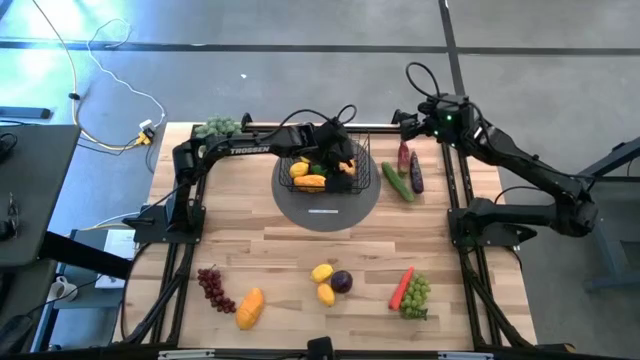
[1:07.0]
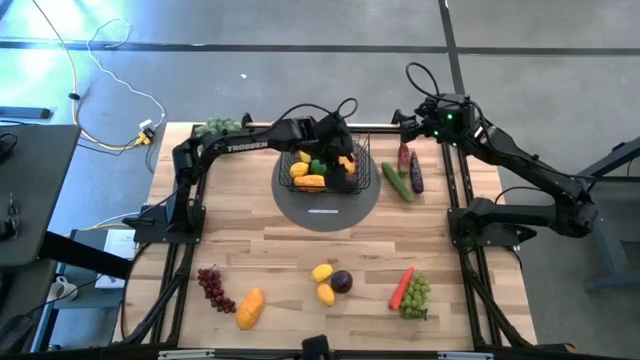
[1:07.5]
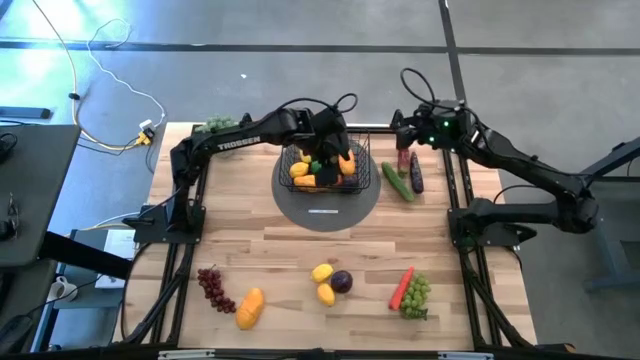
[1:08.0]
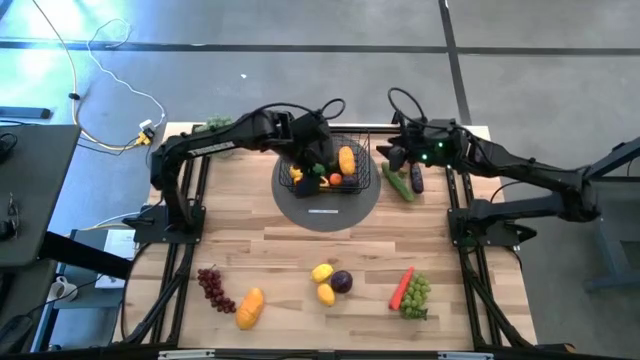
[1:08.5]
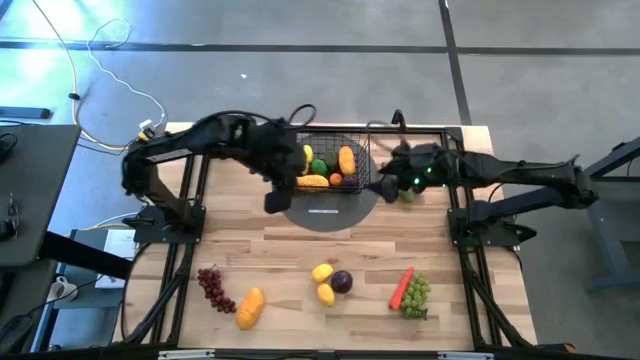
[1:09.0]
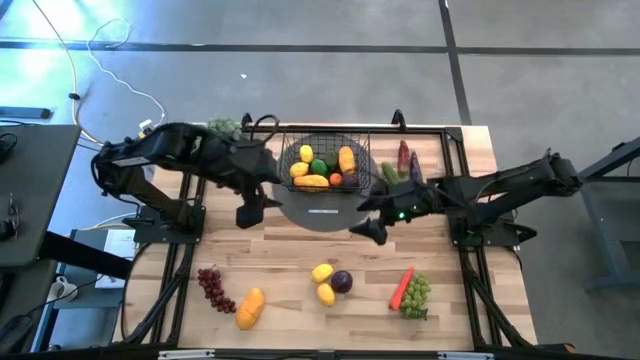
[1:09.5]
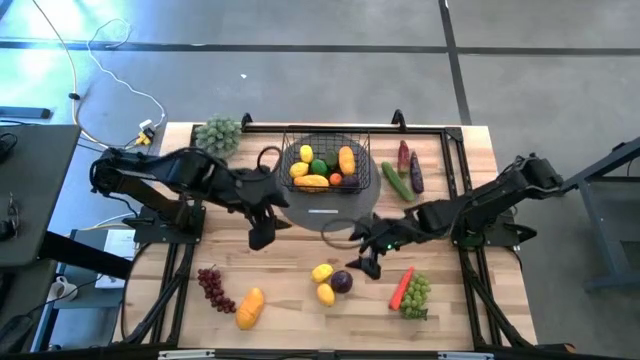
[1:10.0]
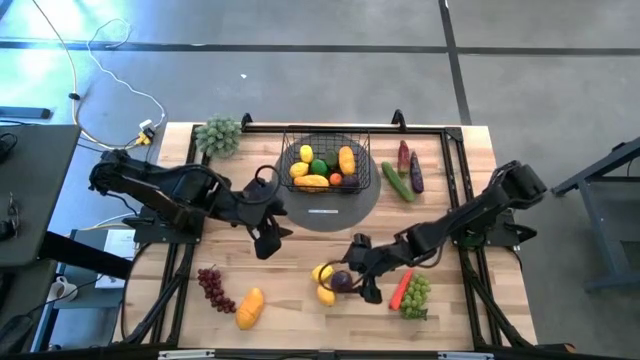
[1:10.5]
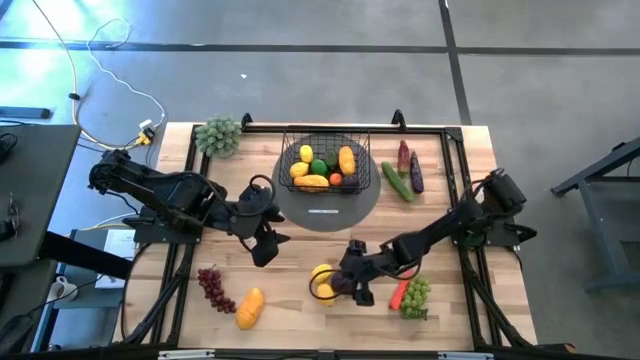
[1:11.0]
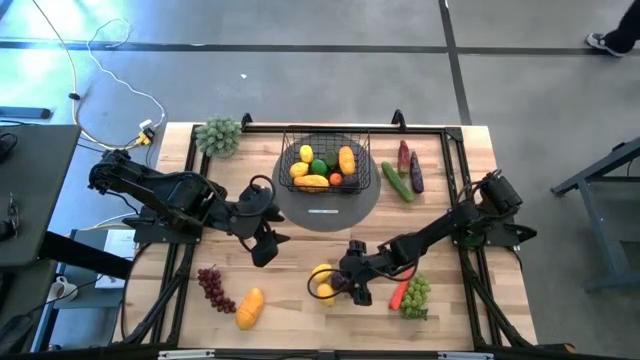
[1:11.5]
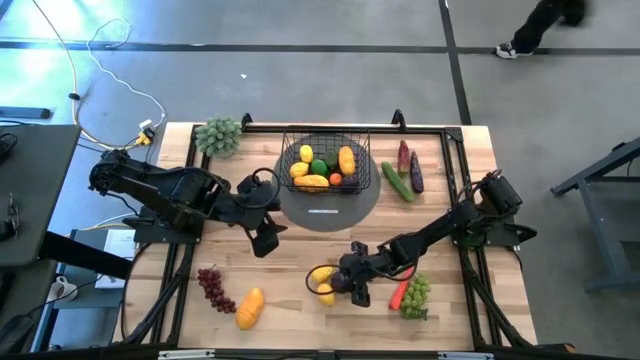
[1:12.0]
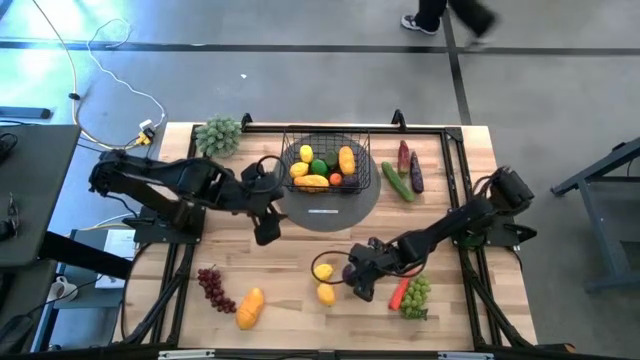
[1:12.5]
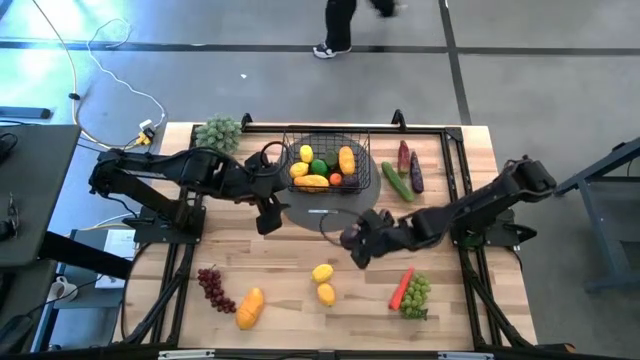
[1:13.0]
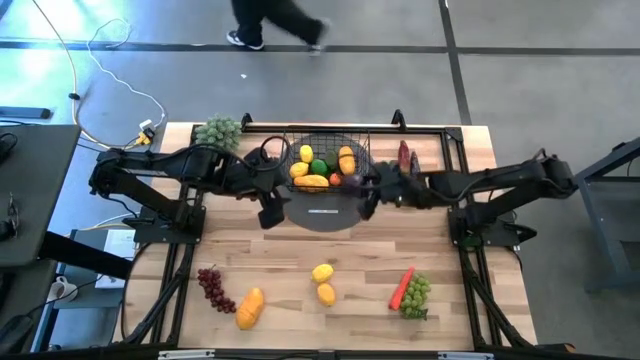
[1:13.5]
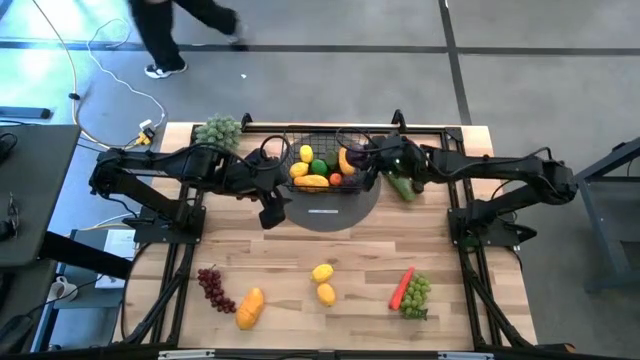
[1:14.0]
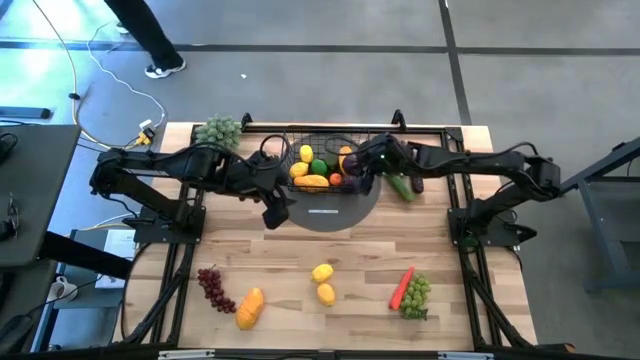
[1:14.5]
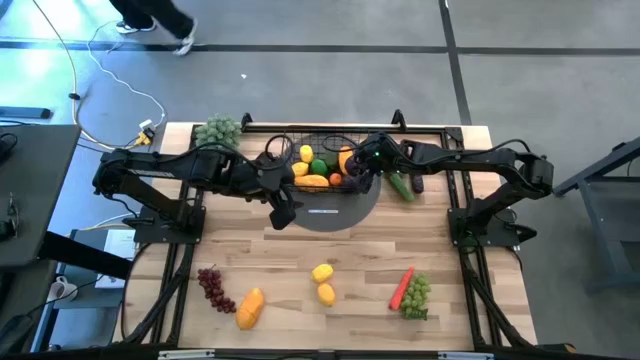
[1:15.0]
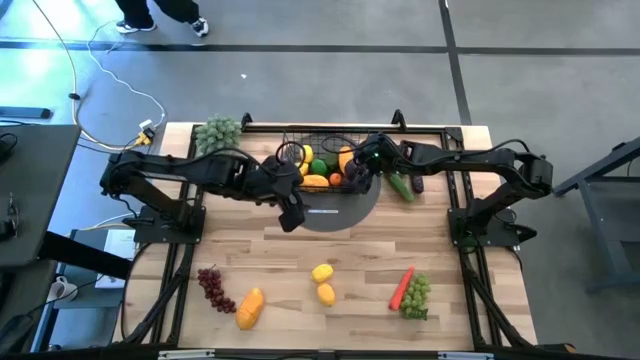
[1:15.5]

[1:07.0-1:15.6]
Task: Build produce basket
Put the purple avocado into the wire basket

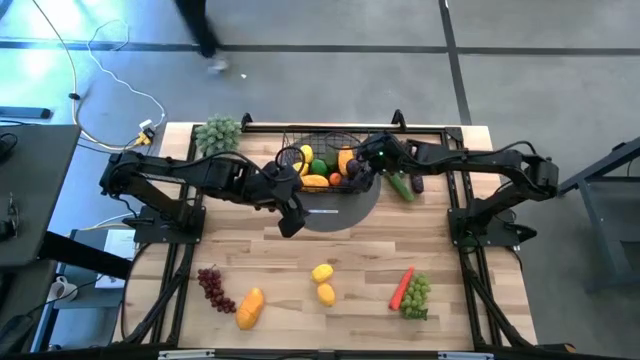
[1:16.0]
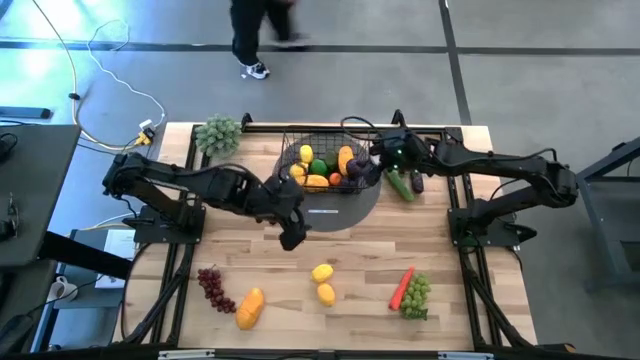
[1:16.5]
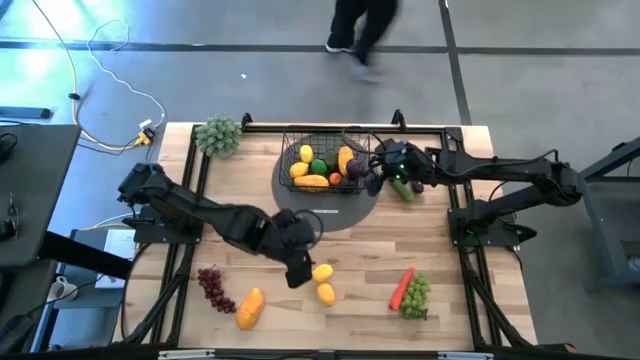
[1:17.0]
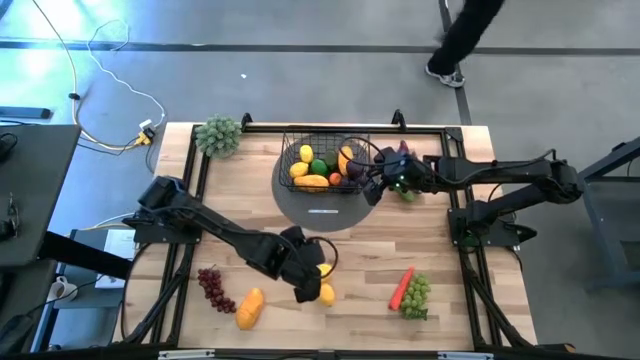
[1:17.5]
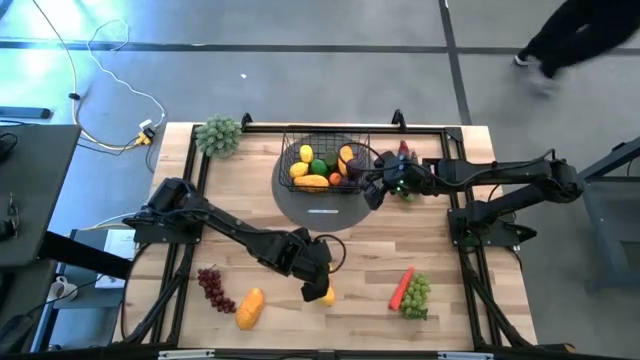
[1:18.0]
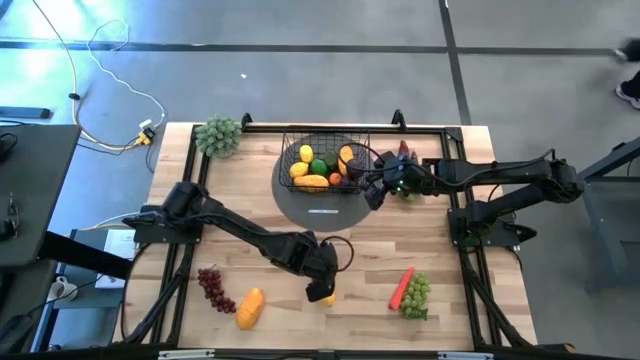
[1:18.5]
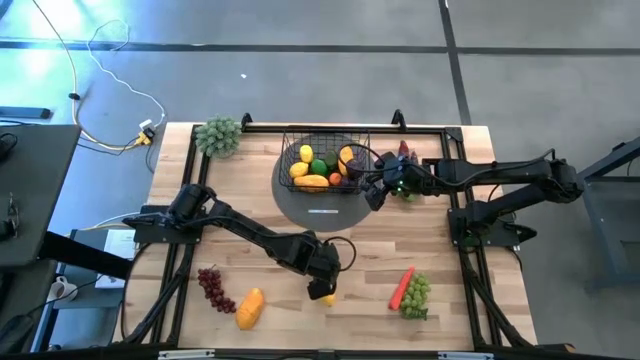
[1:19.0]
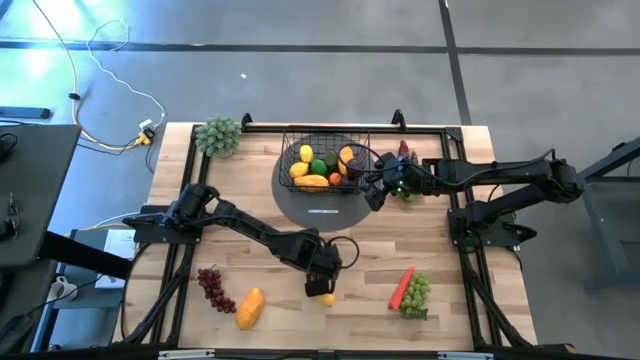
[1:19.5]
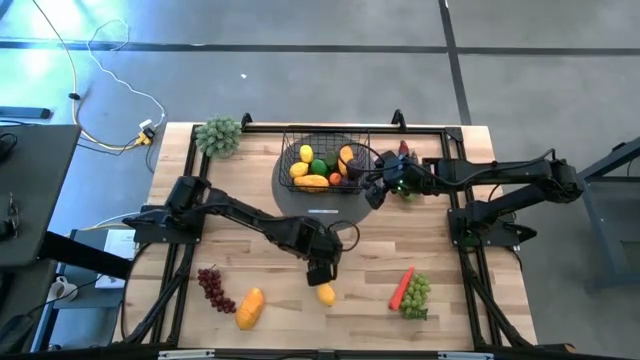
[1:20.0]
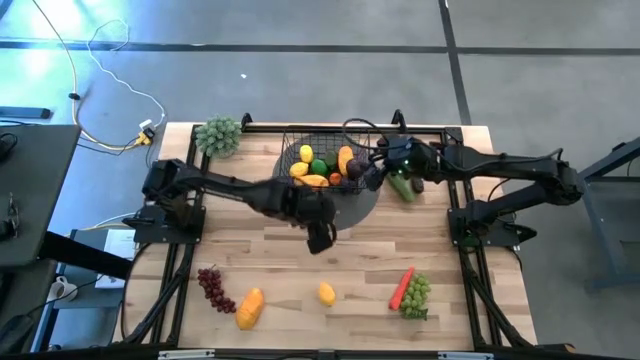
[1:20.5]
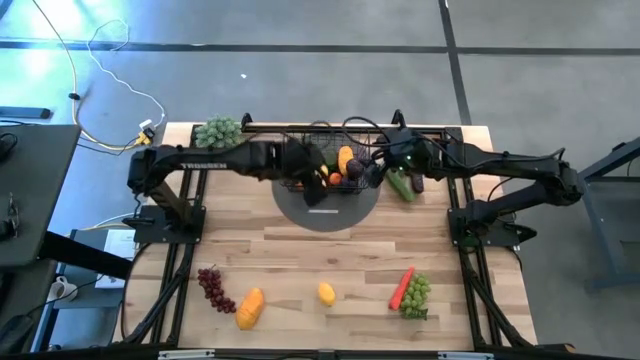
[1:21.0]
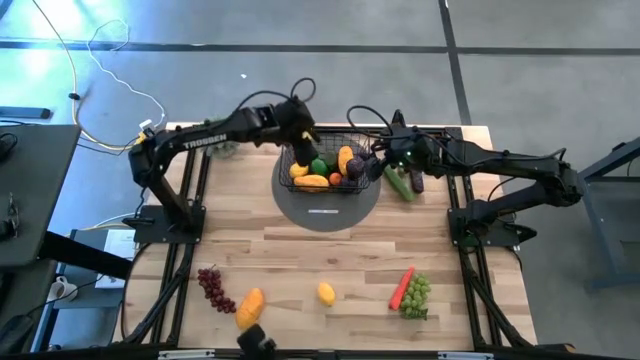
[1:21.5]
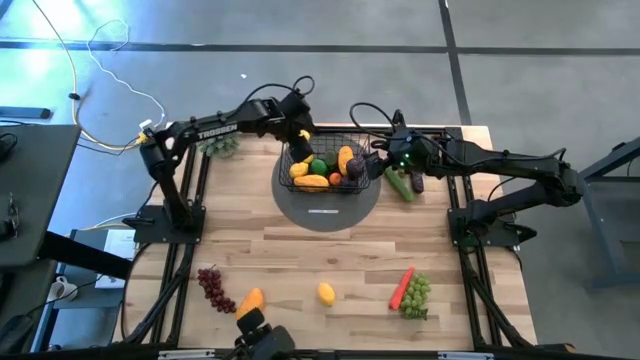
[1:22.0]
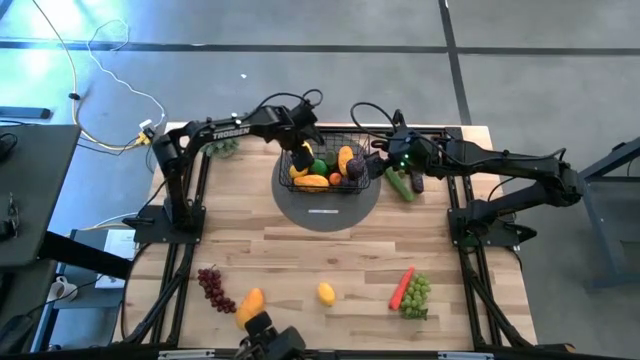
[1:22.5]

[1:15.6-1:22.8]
Put the yellow lemon into the wire basket

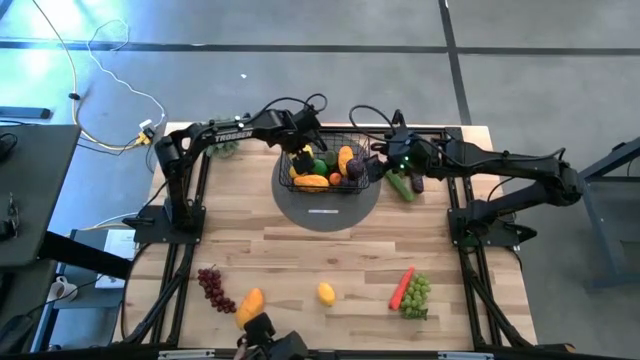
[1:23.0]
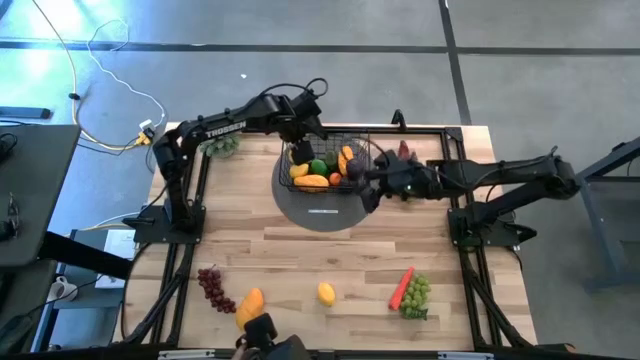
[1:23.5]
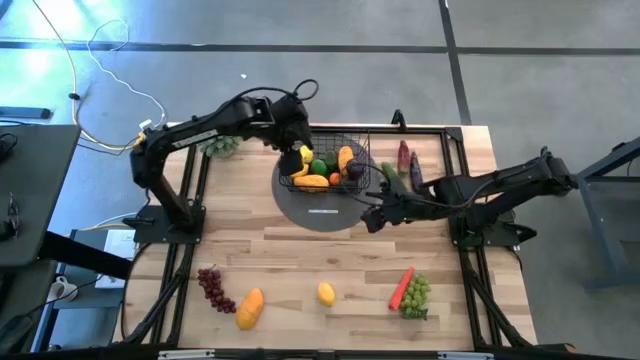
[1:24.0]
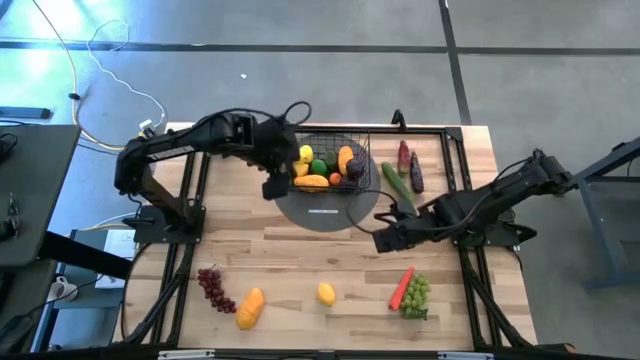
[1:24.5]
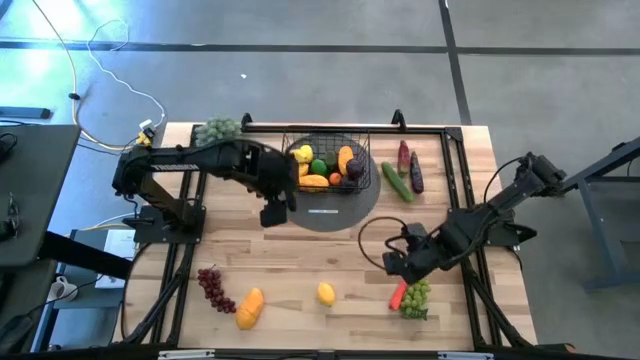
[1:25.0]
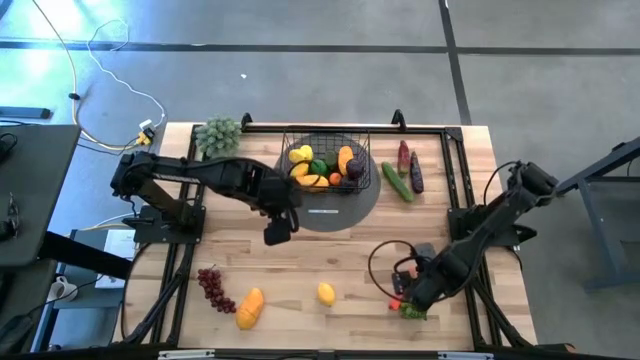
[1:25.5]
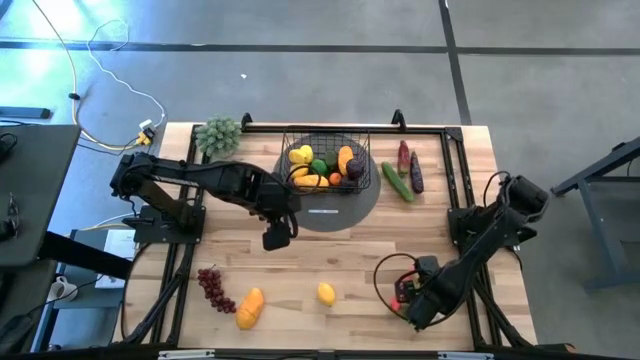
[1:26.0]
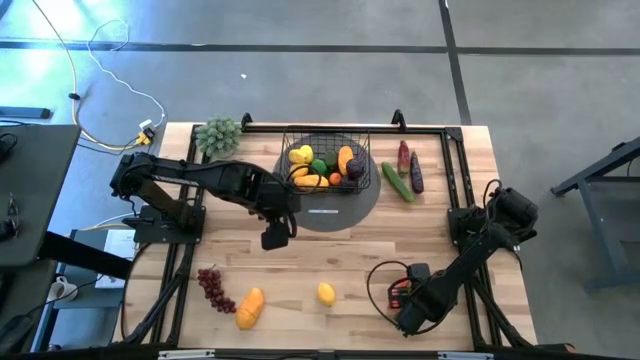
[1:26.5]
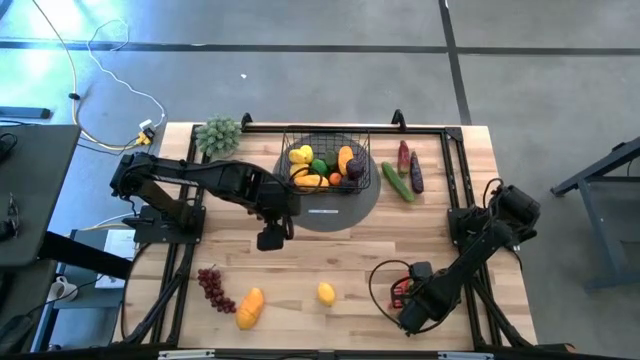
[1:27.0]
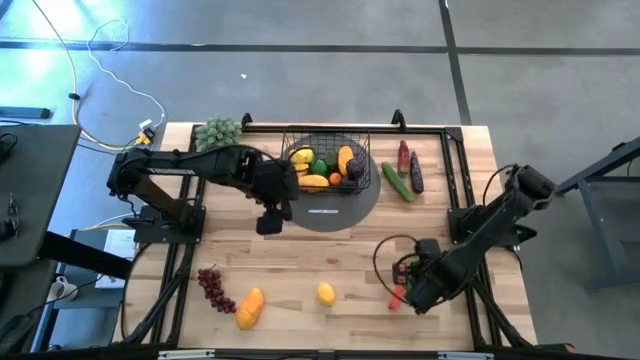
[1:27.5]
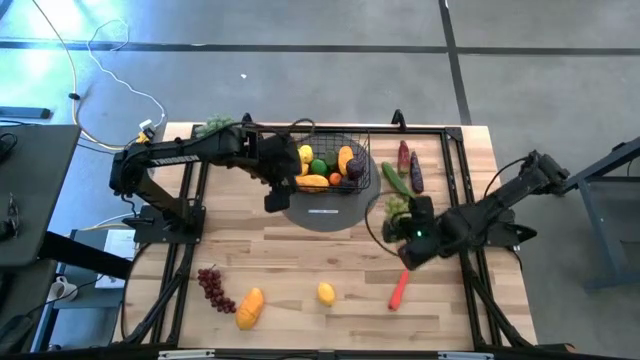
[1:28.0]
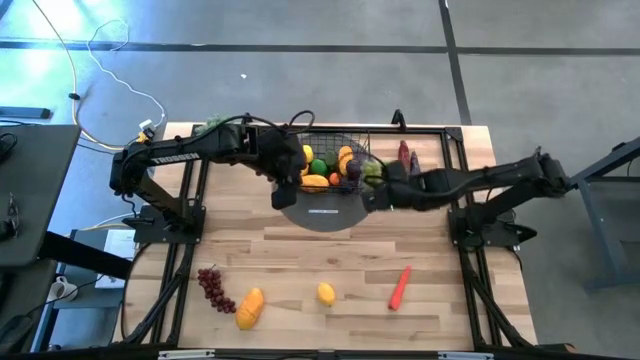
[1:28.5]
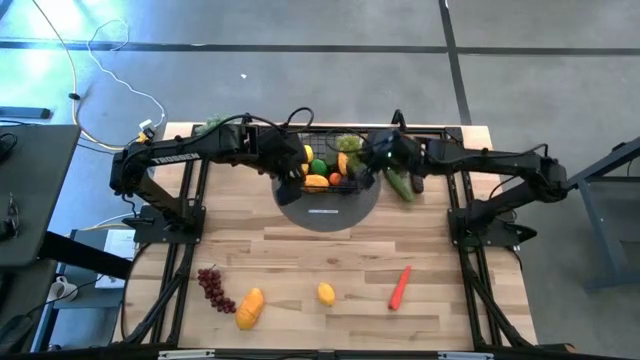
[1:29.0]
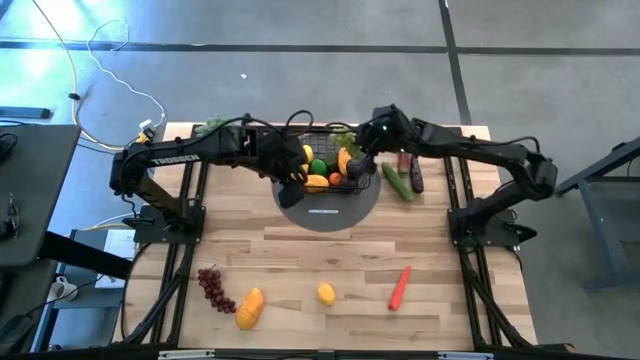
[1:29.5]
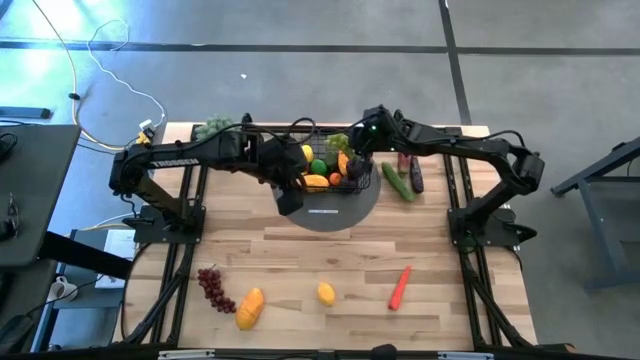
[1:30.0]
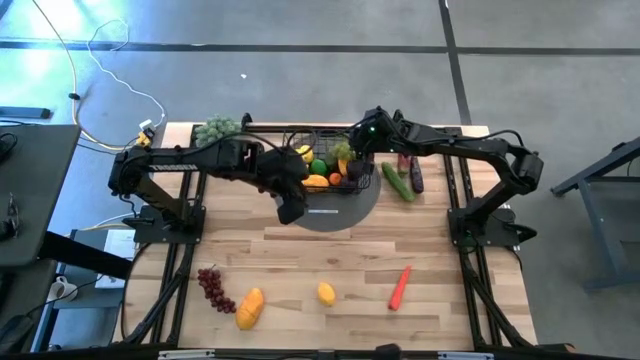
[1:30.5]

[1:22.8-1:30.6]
Put the green grapes into the wire basket
